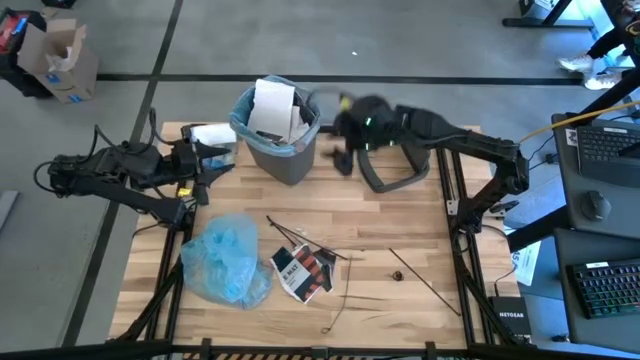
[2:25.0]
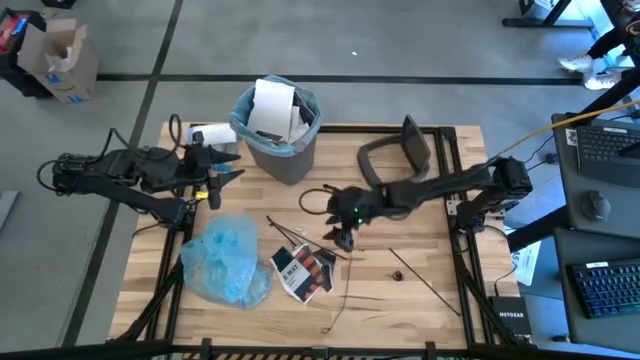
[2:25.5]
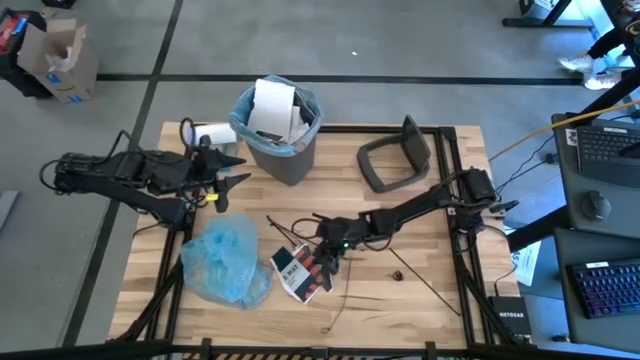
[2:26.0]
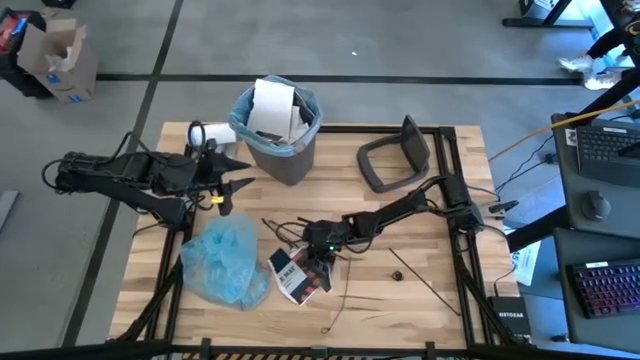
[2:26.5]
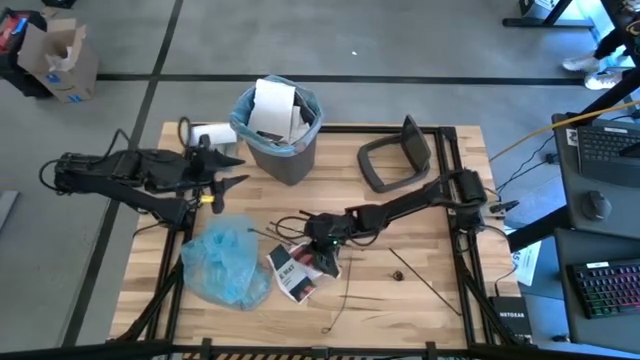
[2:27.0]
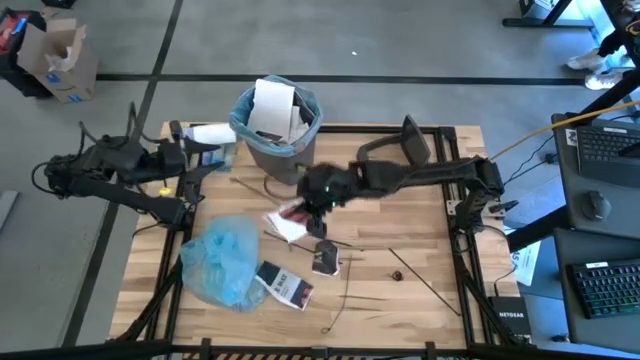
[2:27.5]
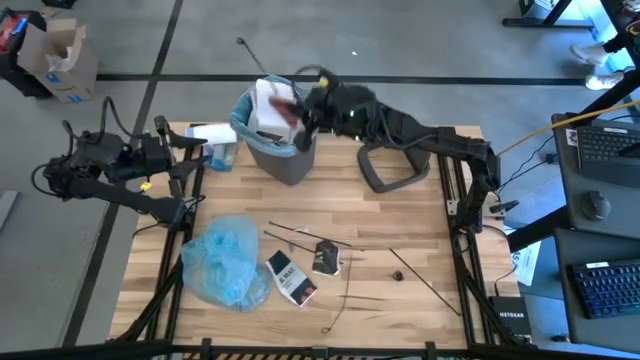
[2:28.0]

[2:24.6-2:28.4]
Task: Pick and place trash into bin
Put the white paper and zip tie into the trash bin

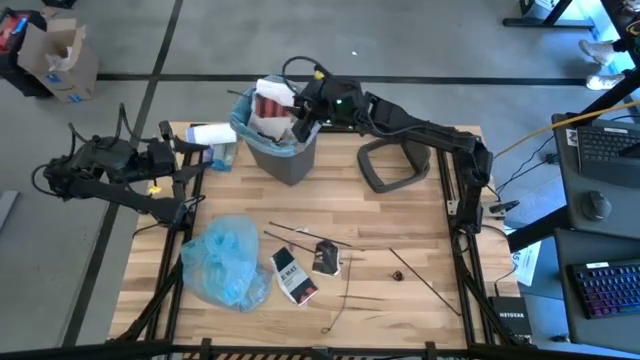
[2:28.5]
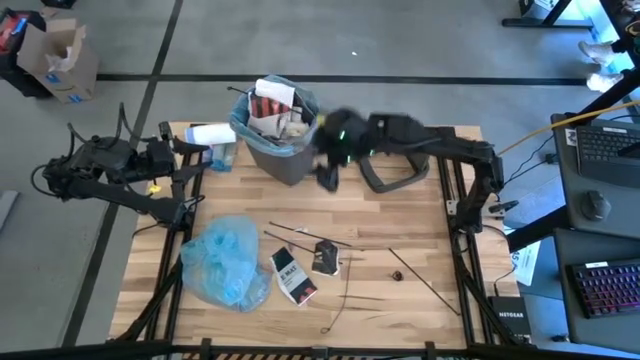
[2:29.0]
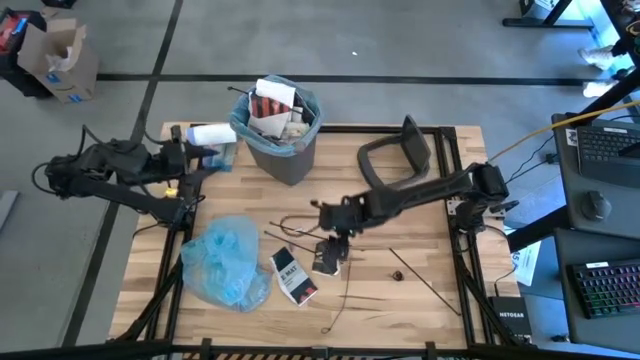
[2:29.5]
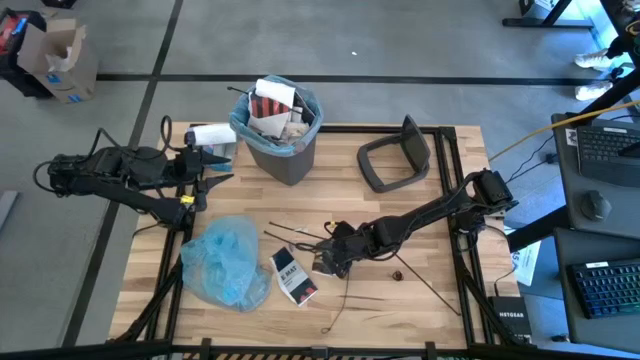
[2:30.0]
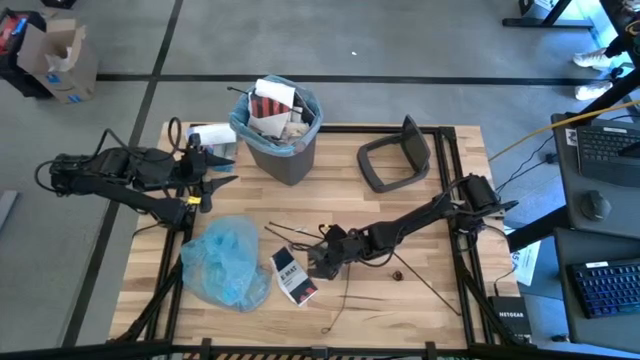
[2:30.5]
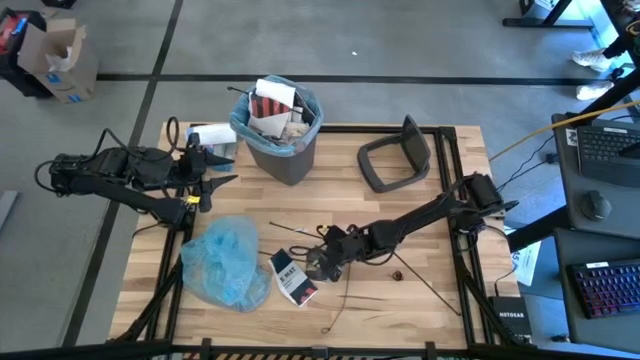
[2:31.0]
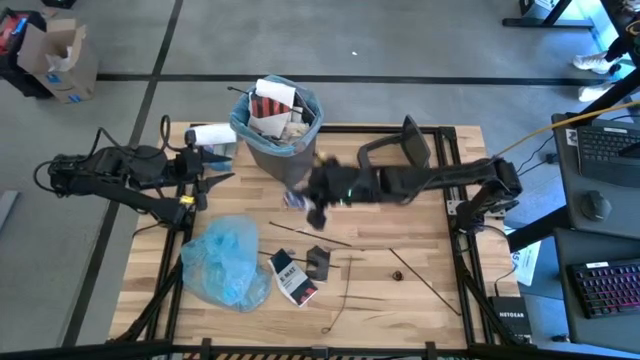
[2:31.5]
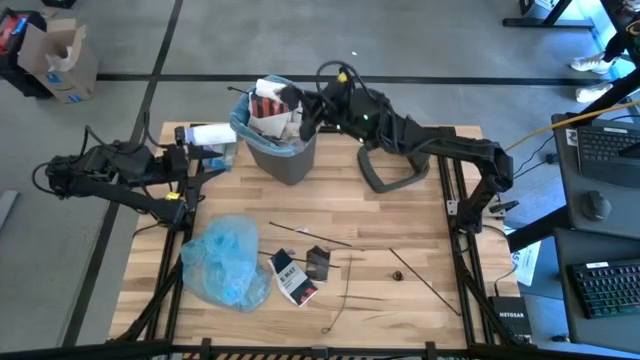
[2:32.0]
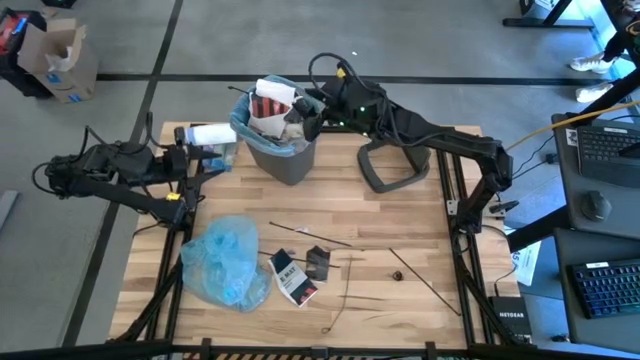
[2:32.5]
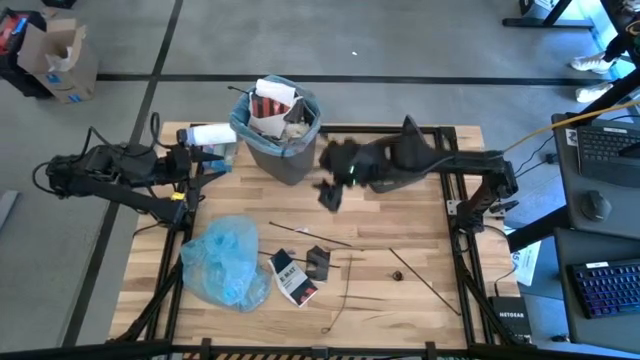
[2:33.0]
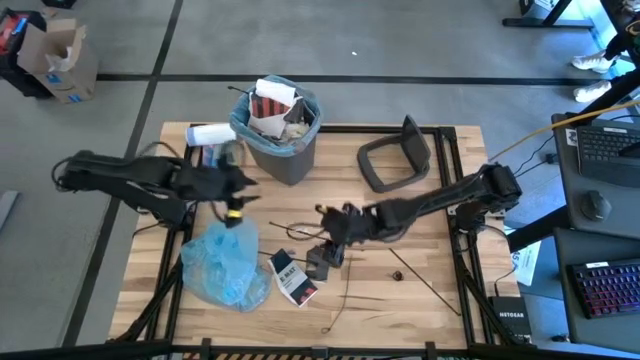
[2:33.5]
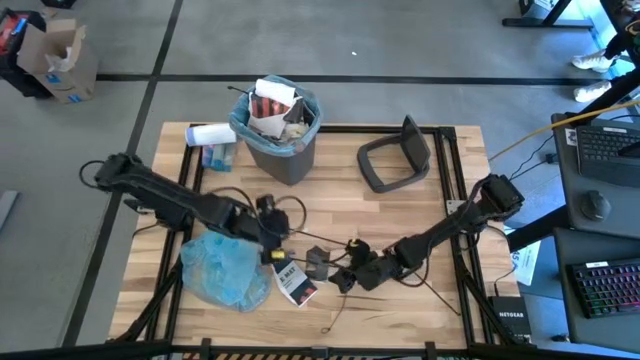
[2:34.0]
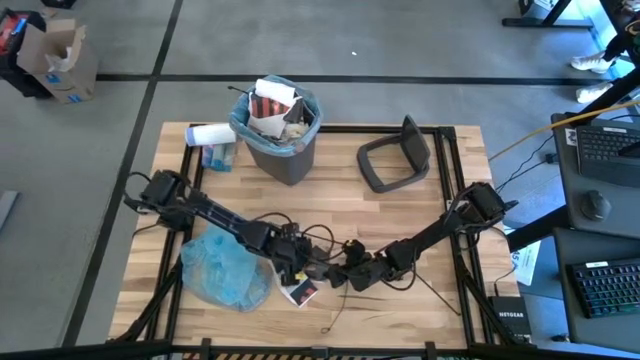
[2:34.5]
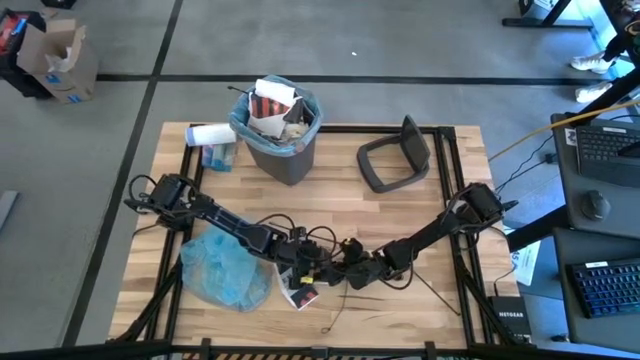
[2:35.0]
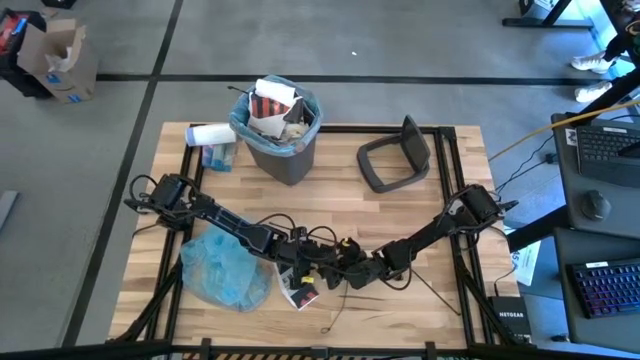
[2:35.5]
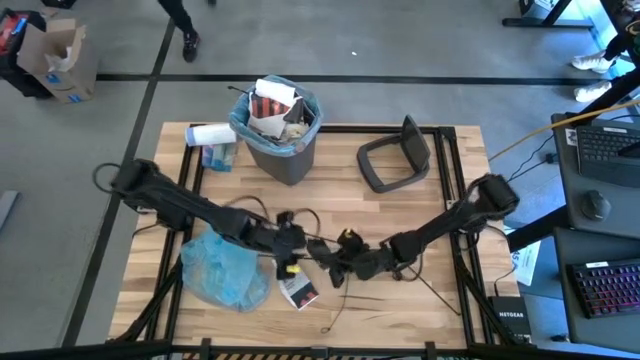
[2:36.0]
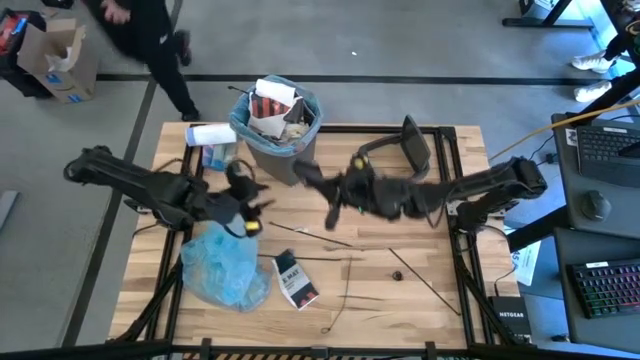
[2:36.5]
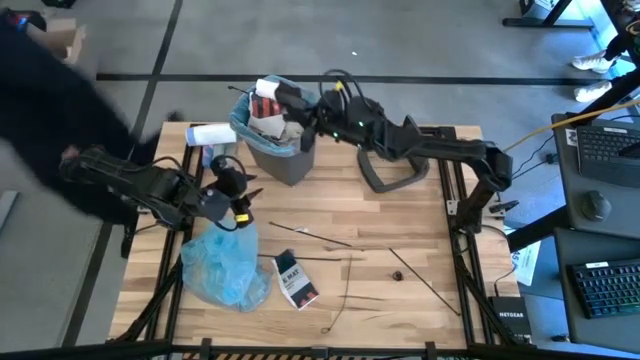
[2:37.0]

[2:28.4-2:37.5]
Put the white paper into the trash bin

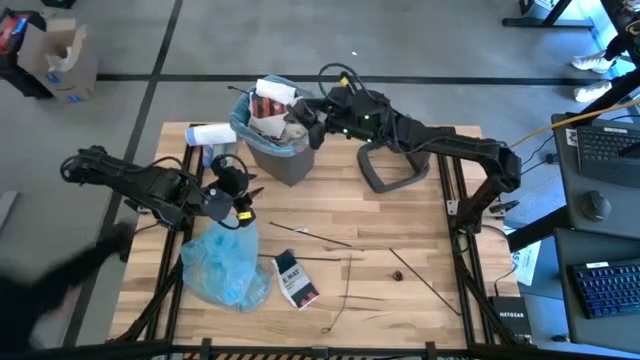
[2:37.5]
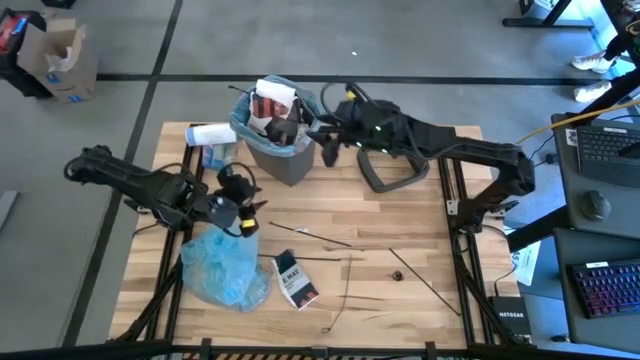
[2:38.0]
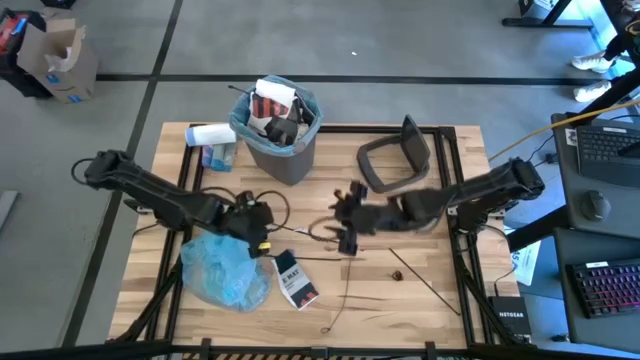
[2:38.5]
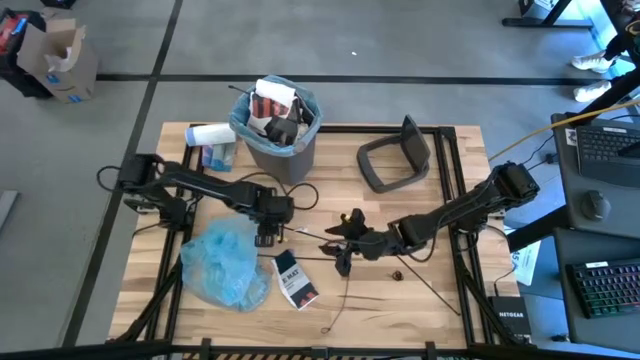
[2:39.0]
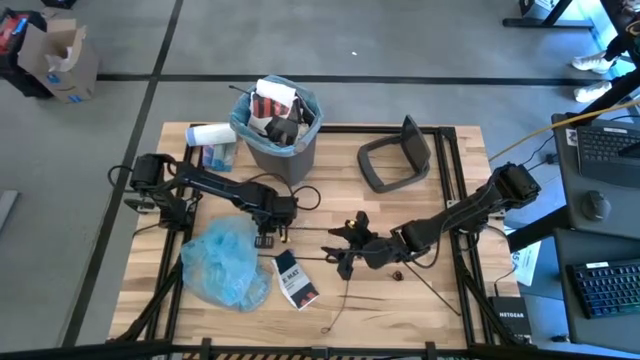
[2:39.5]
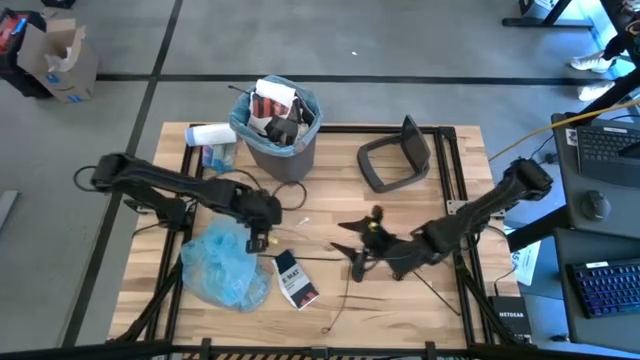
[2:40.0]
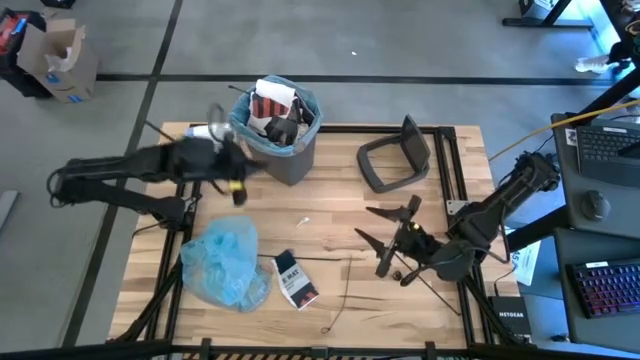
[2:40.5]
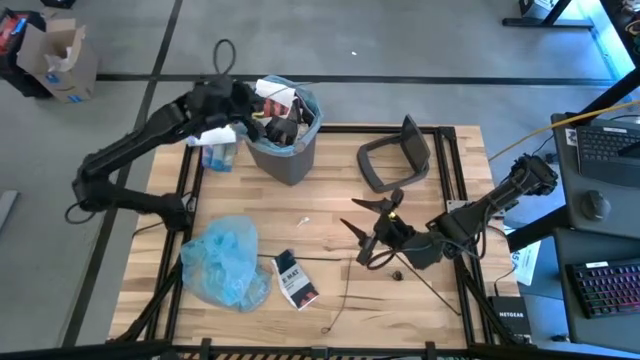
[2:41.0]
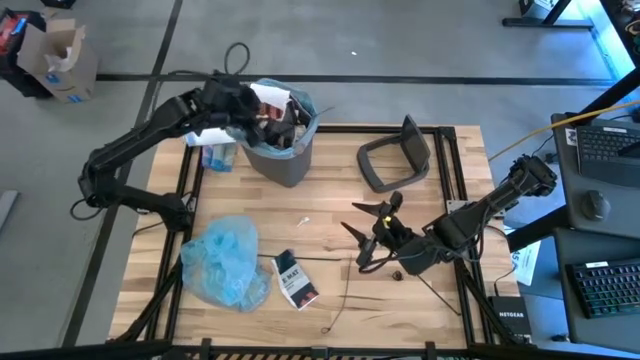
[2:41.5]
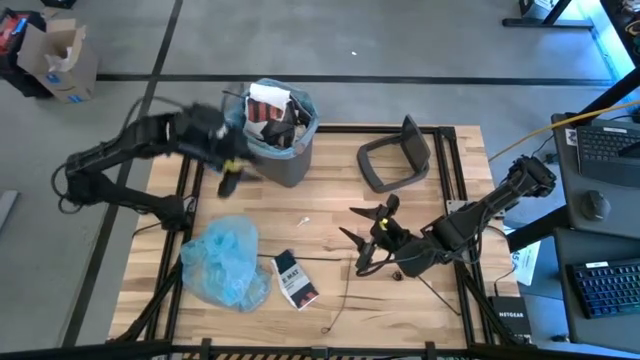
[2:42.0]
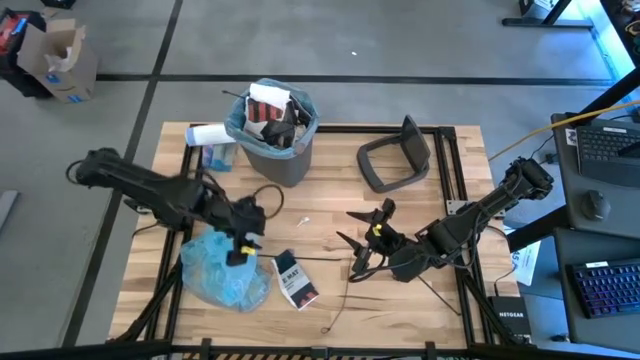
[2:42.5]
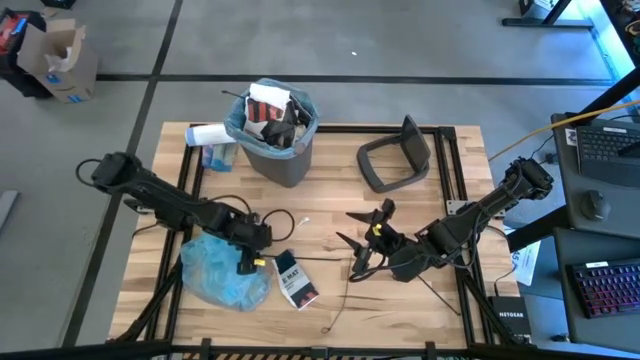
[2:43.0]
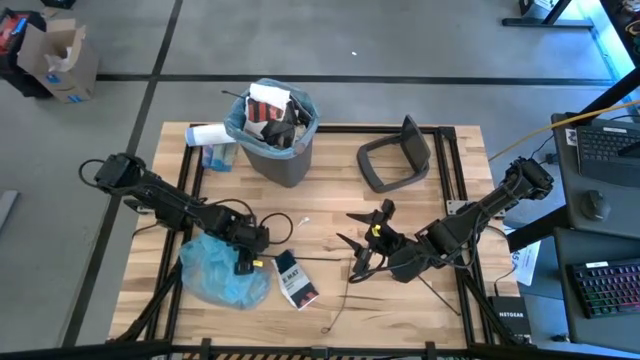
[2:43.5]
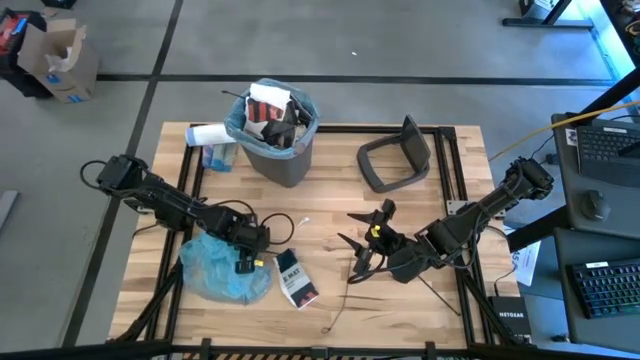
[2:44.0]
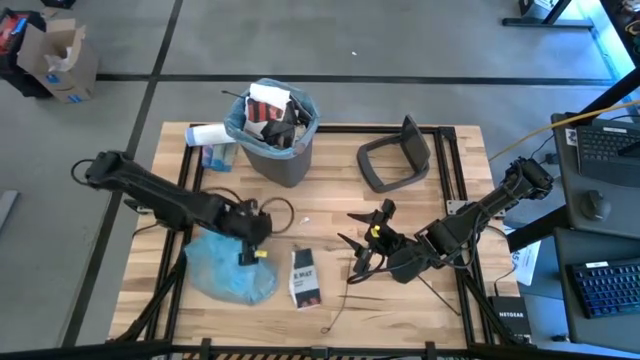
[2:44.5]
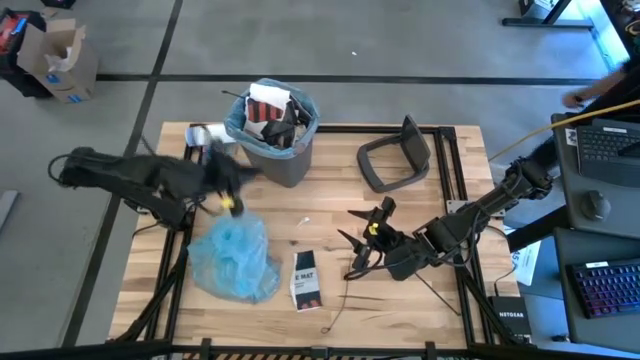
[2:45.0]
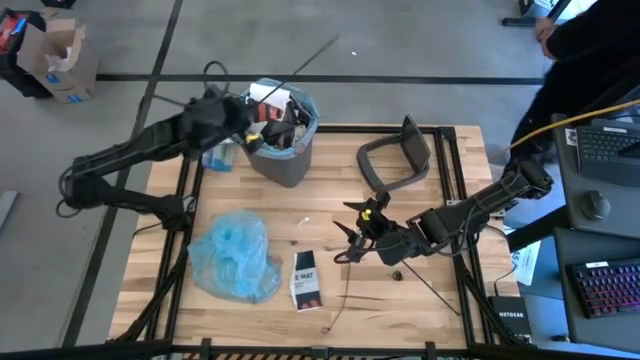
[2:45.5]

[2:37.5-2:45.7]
Put the zip tie into the trash bin

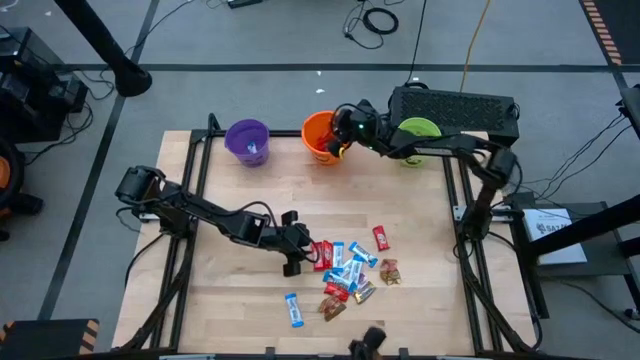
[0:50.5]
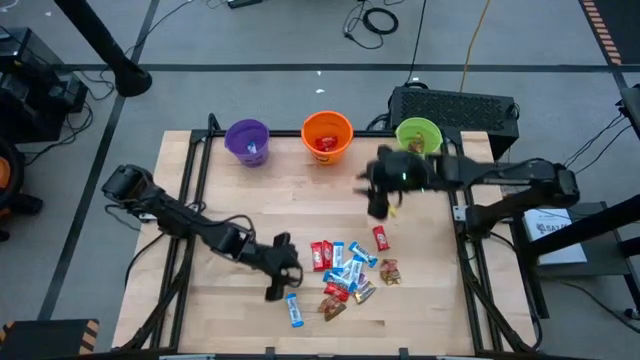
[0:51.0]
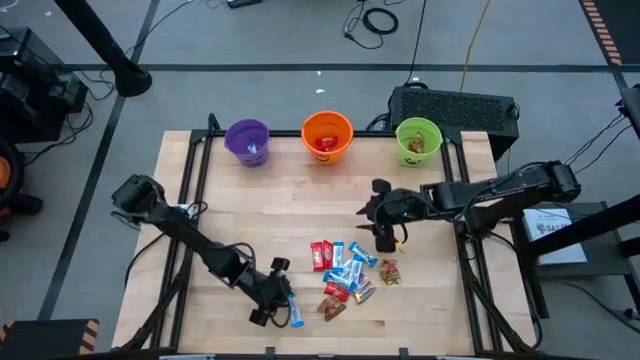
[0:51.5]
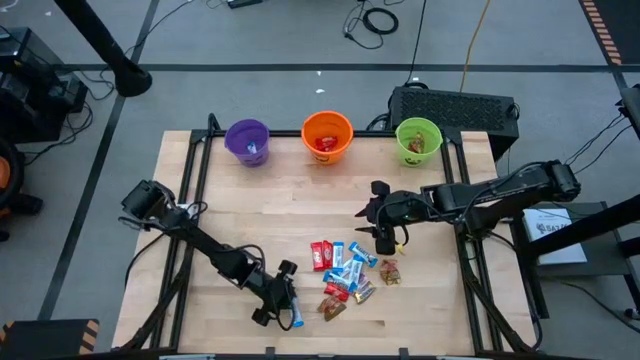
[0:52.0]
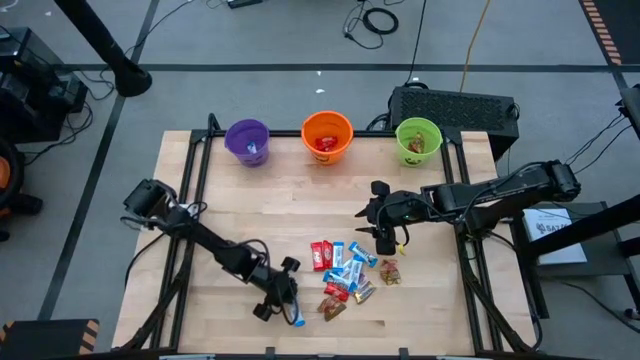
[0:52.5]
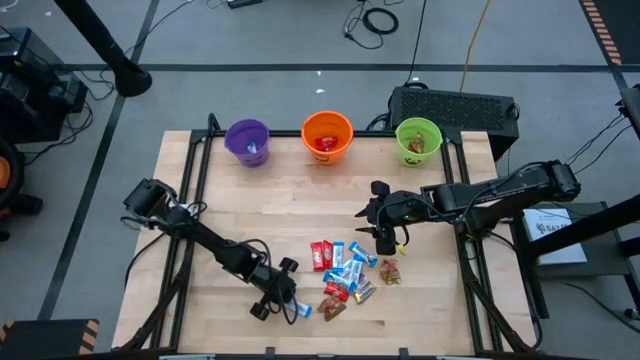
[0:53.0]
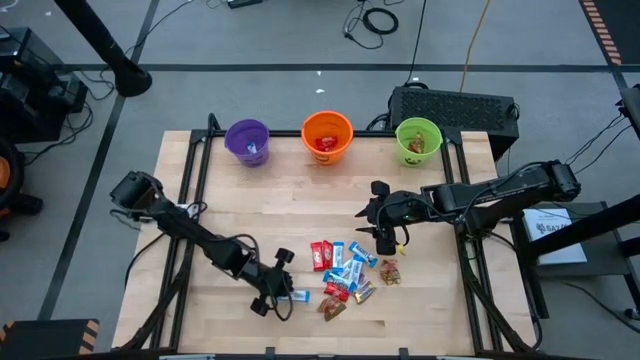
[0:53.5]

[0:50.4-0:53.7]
Task: Sort candy by brand, put in halloween buckets
Put the white chocolate into the purple bucket
